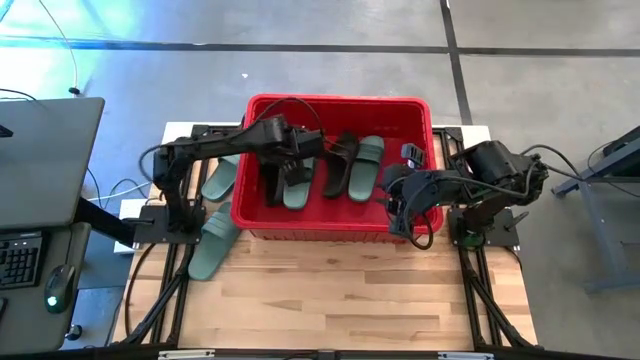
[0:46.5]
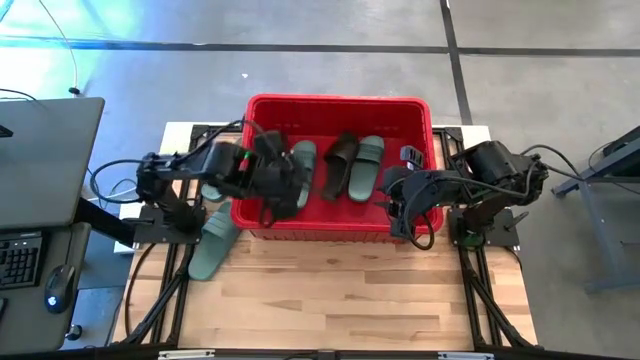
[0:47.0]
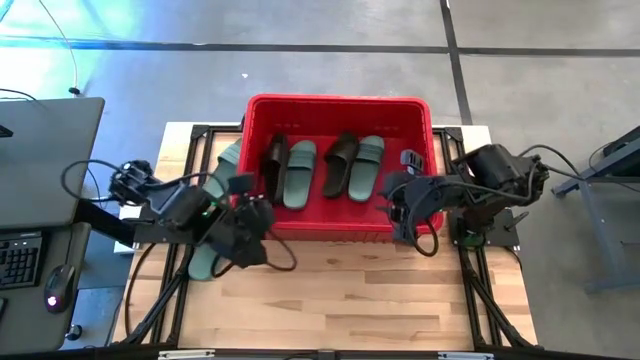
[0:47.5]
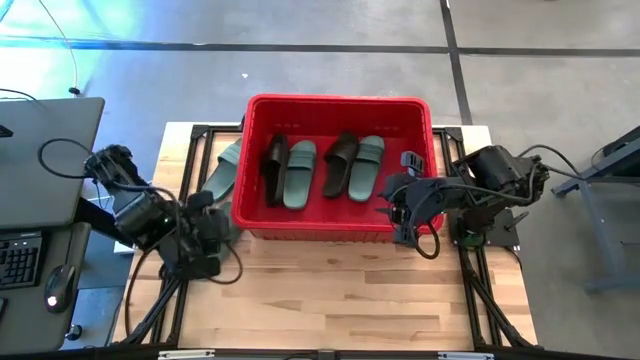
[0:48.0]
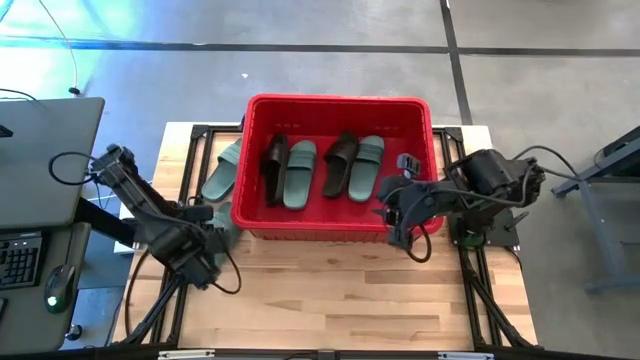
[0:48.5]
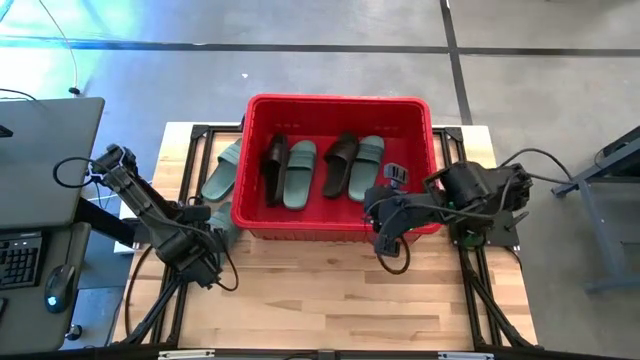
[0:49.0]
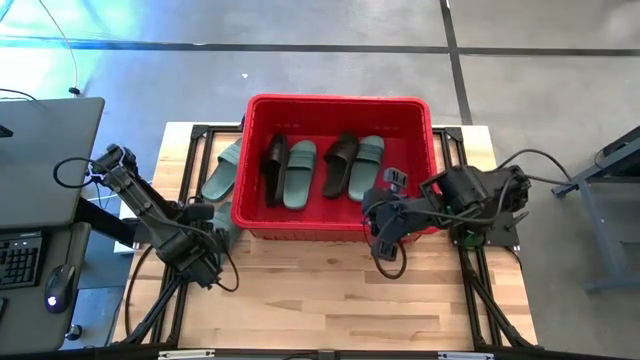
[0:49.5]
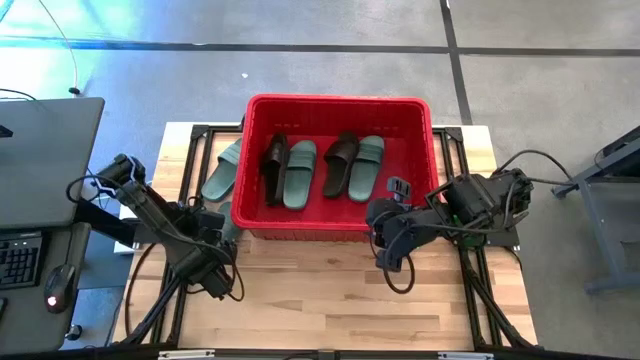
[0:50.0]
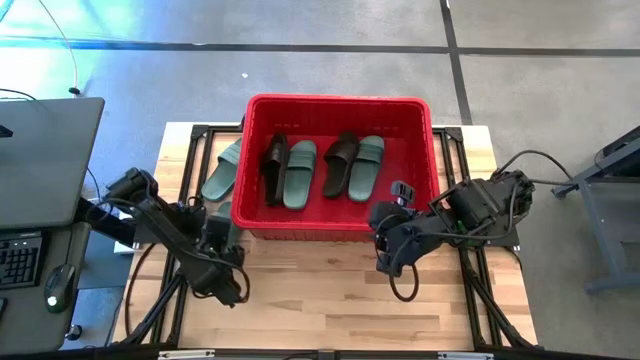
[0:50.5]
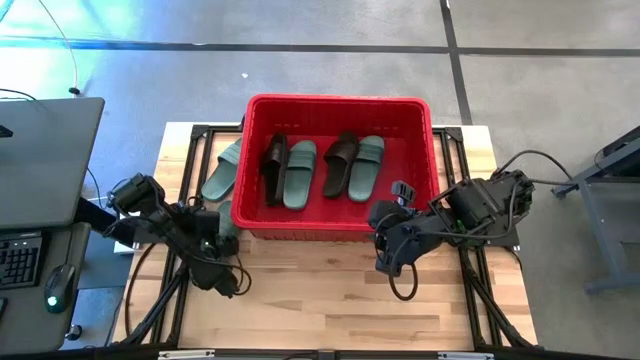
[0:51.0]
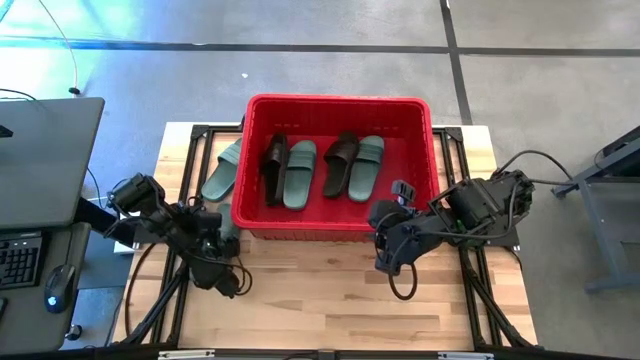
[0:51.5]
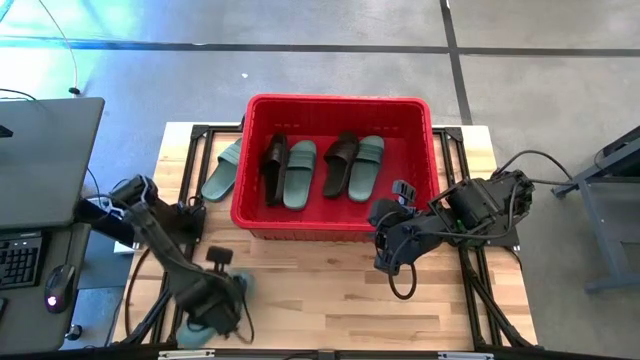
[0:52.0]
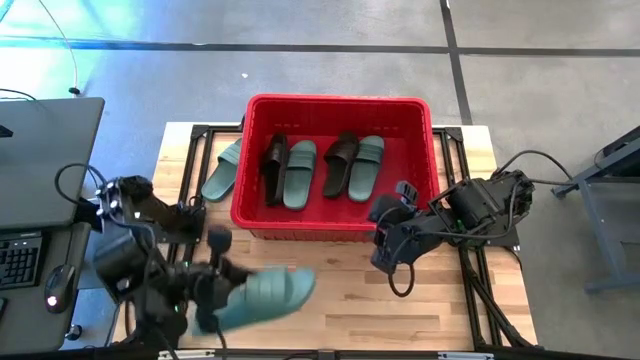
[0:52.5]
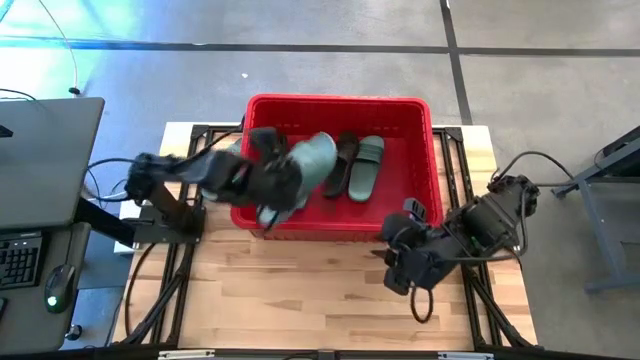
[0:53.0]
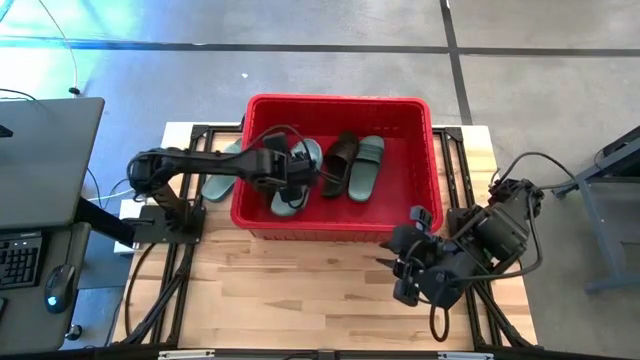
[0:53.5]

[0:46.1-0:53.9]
Task: Pick and place slides into bin
Put the green slide into the red bin

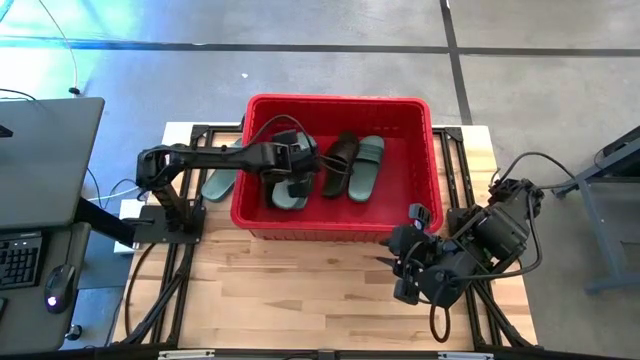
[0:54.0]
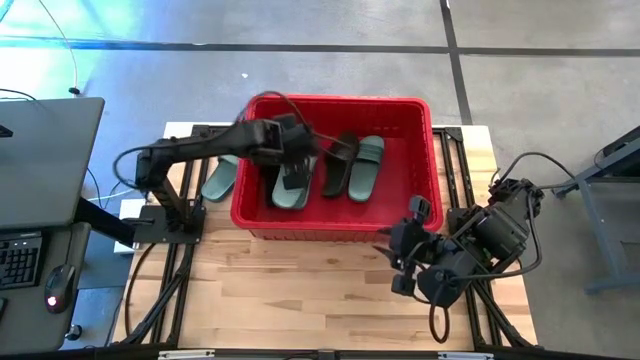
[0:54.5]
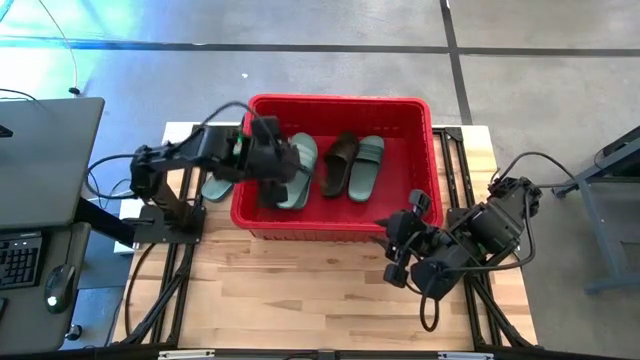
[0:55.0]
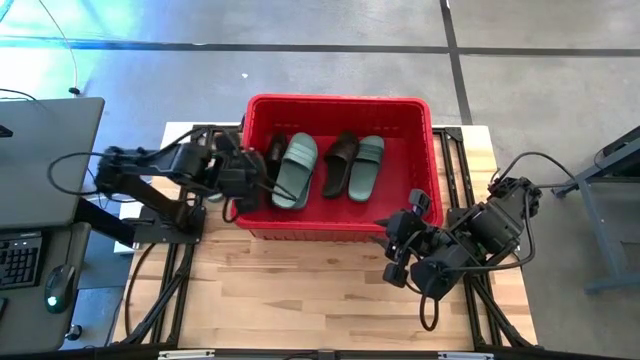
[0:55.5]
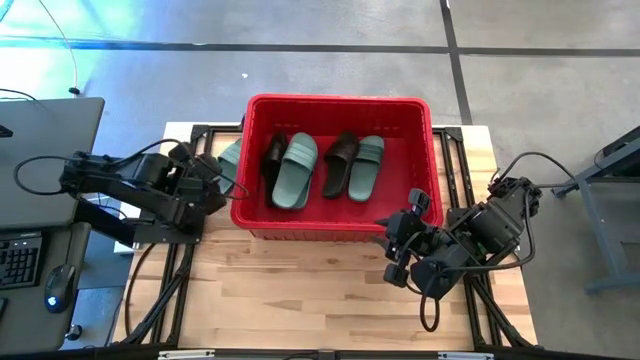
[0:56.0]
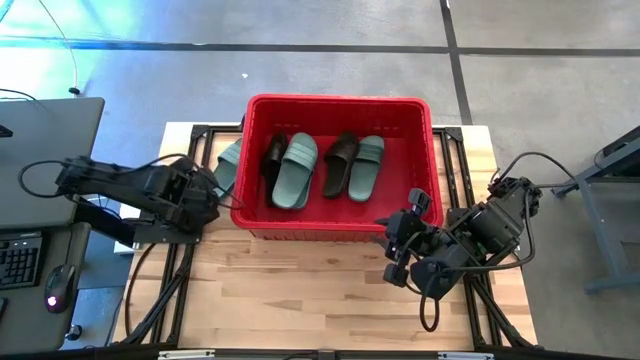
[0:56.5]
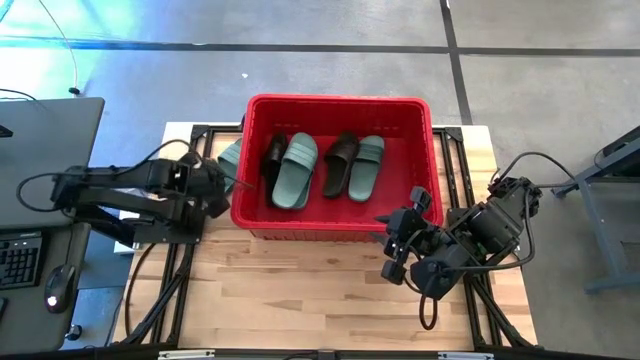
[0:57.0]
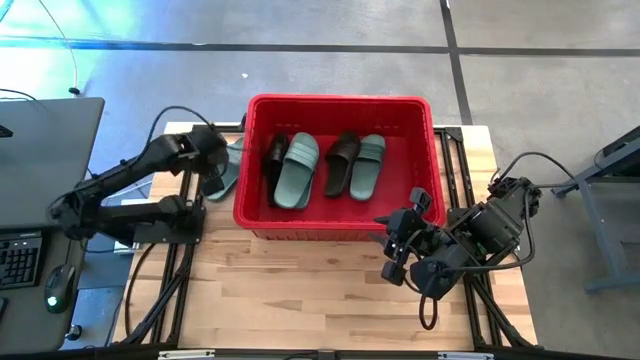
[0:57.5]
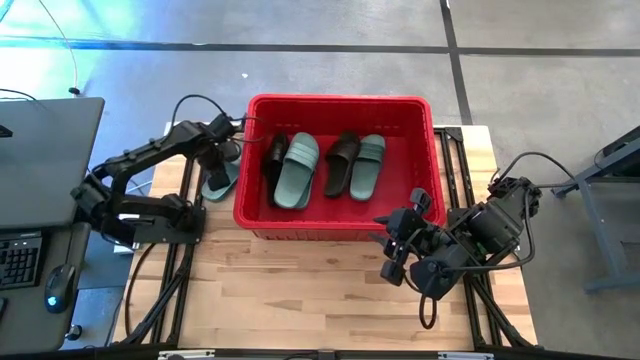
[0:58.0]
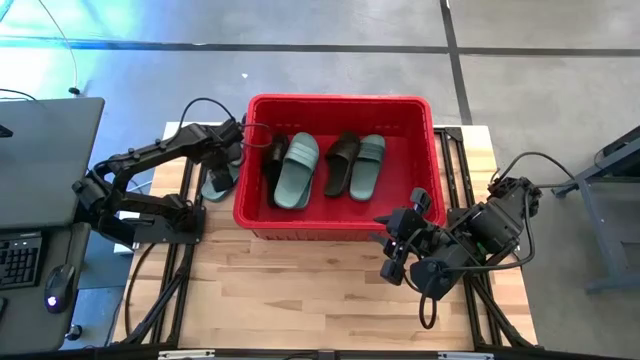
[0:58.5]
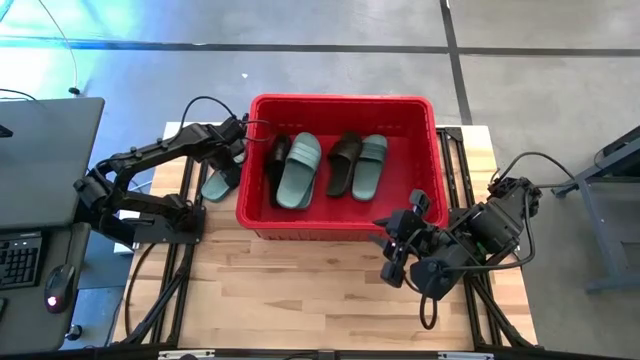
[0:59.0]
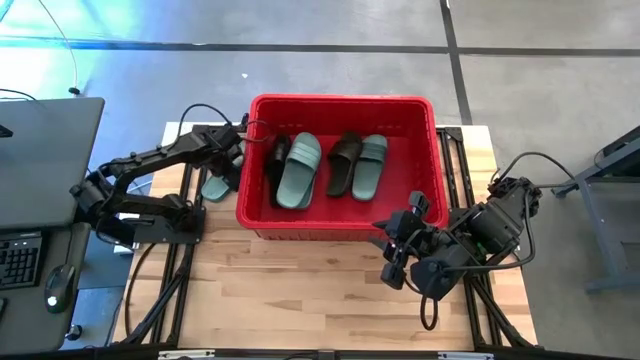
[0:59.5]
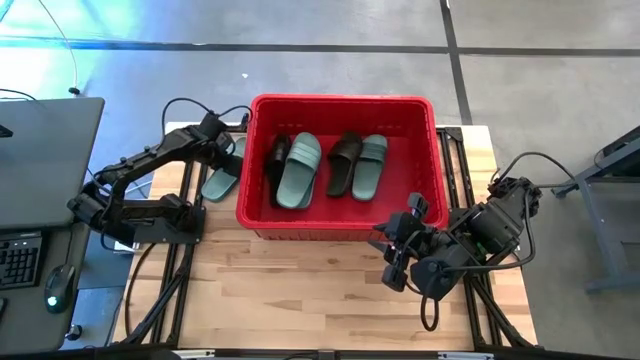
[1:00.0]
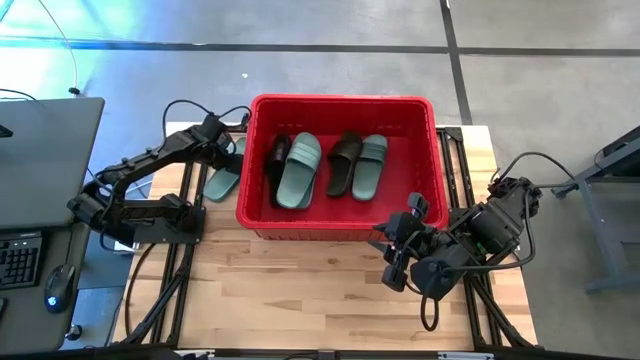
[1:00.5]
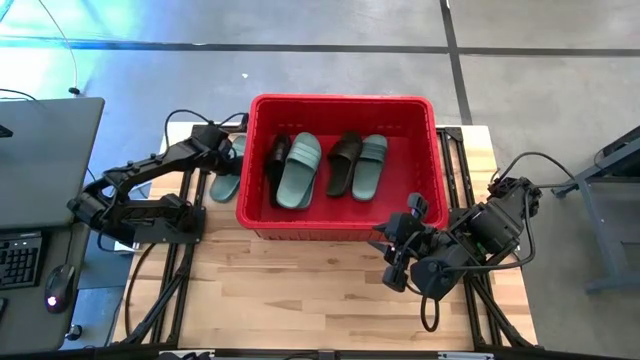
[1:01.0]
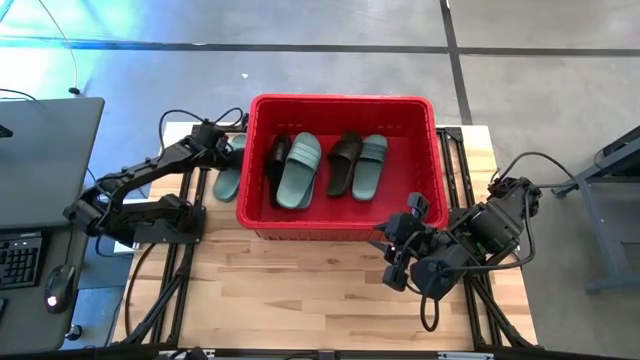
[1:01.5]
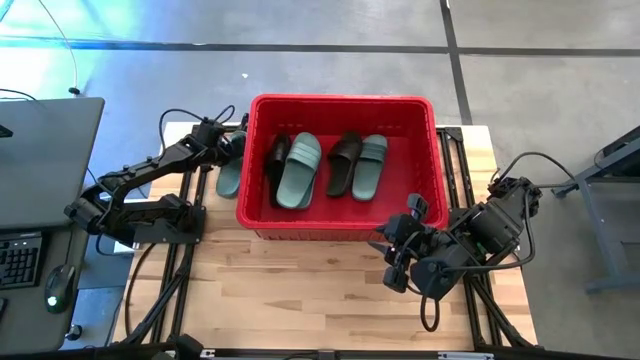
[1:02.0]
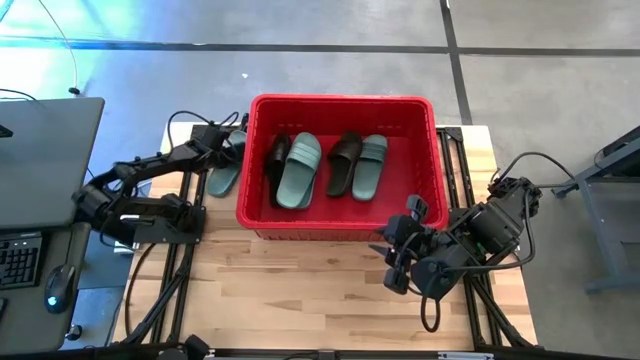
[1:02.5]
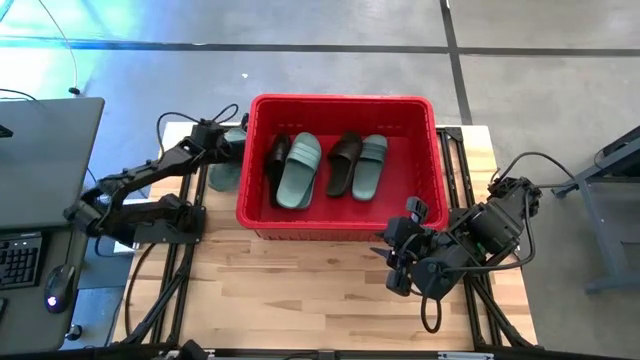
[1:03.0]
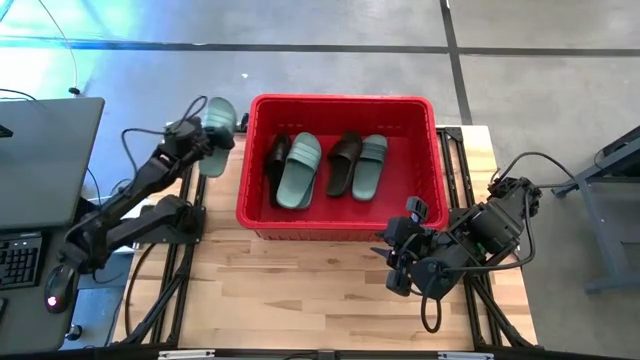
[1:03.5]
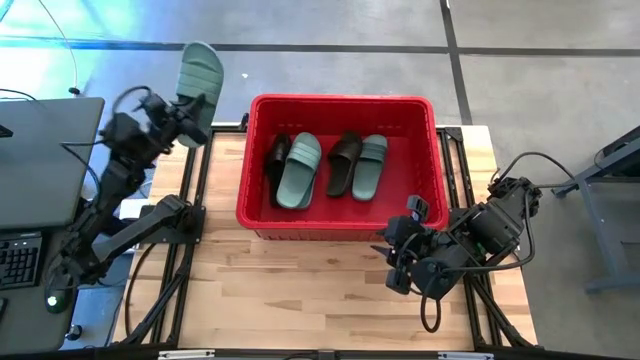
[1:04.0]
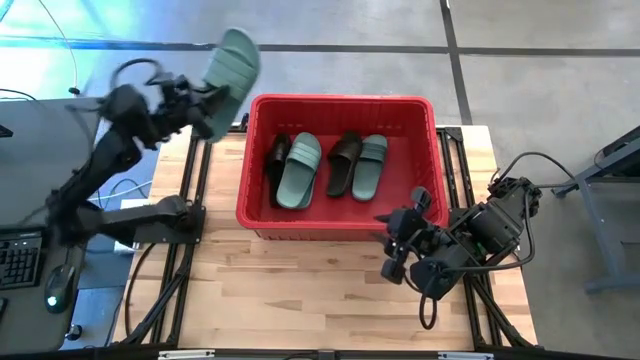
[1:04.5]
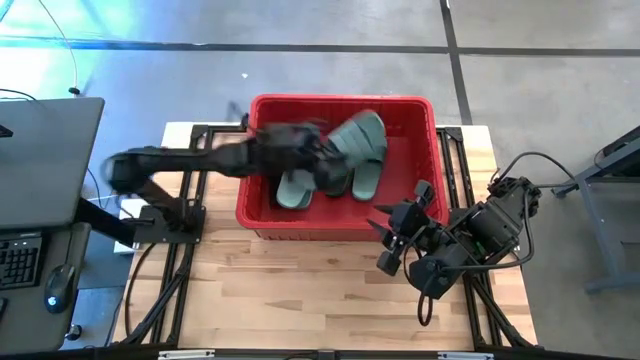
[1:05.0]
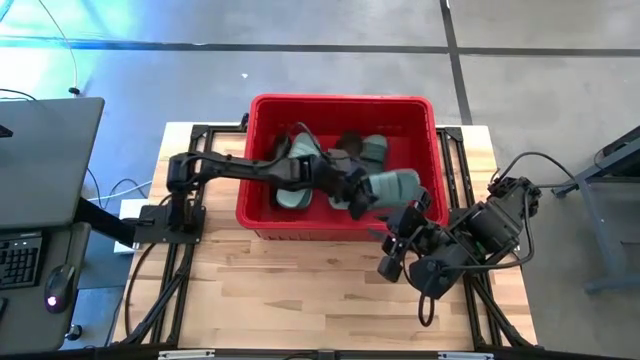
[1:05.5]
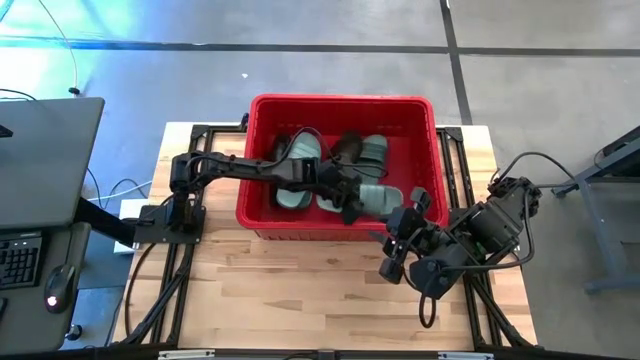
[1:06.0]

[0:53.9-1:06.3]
Put the green slide into the red bin

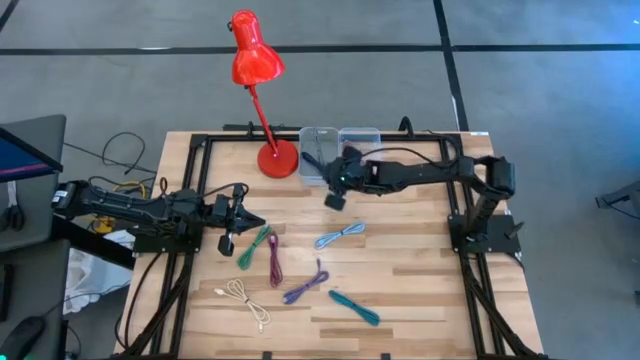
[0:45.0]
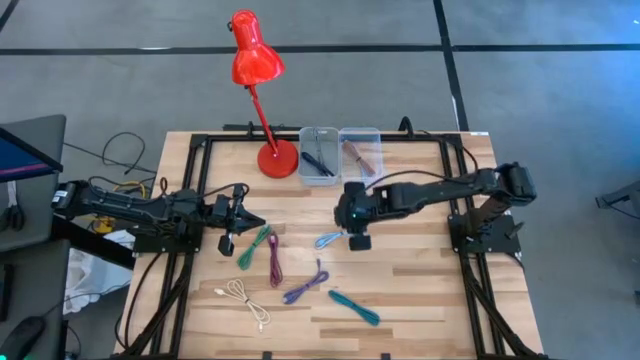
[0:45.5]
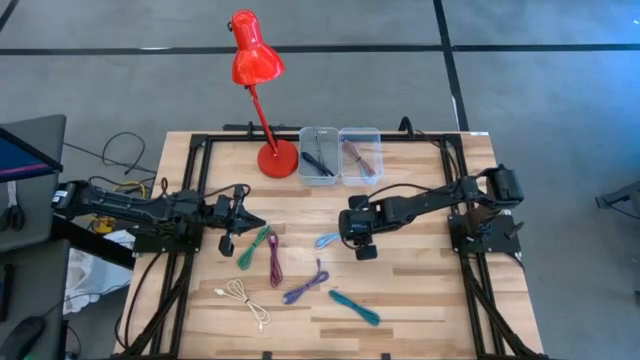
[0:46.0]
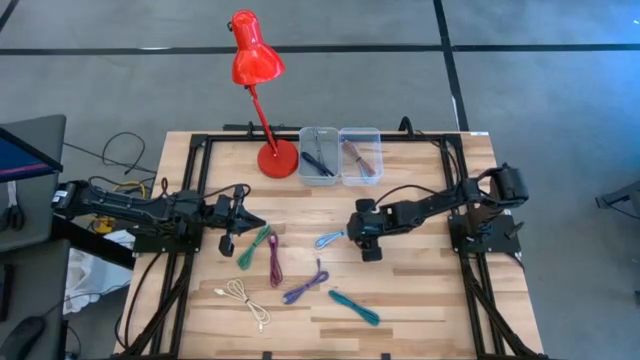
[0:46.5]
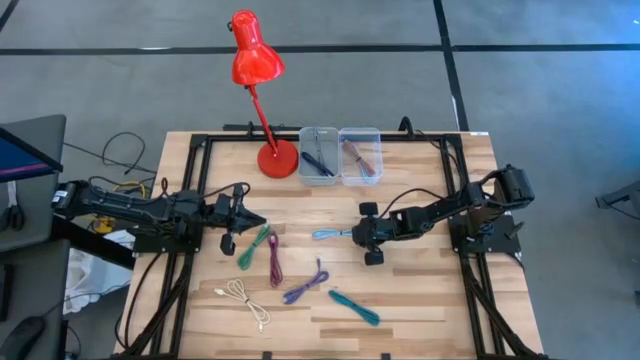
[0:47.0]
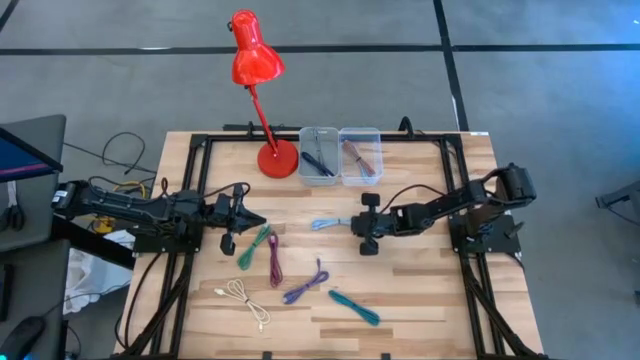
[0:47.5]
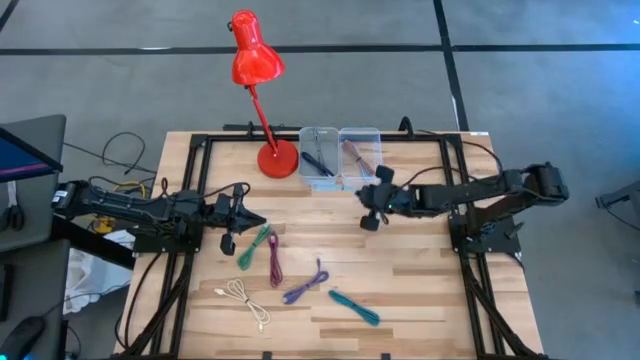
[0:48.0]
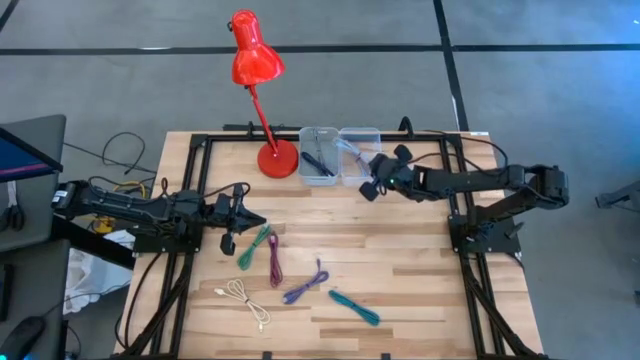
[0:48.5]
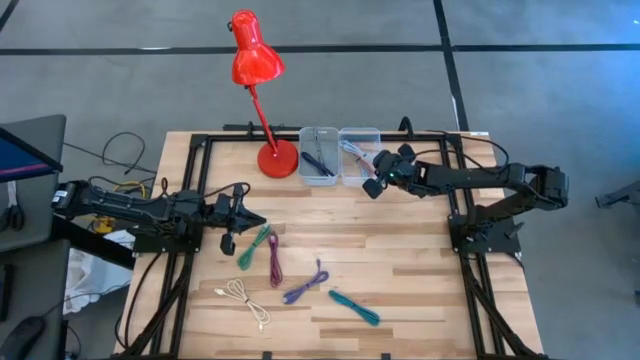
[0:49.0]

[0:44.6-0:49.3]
Task: Pick & Place USB Port
Put the light blue charger cable into the transparent bin
